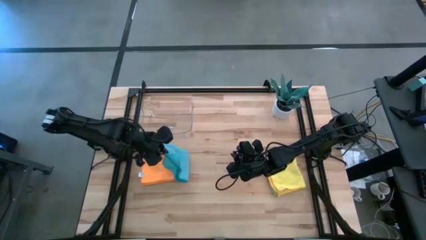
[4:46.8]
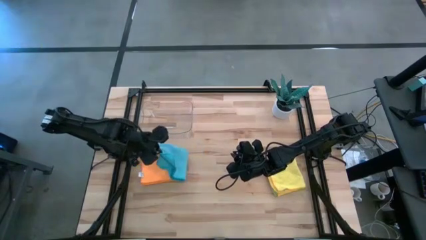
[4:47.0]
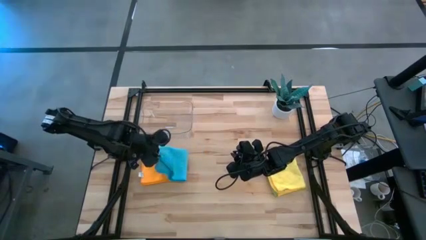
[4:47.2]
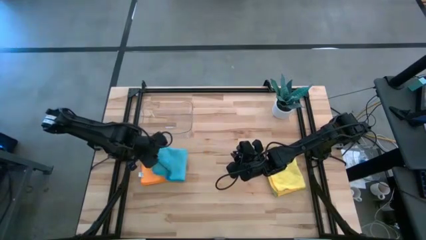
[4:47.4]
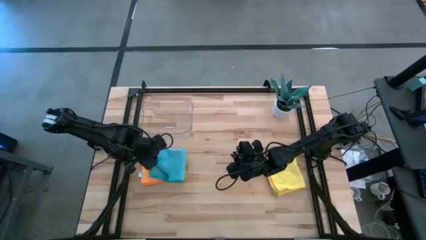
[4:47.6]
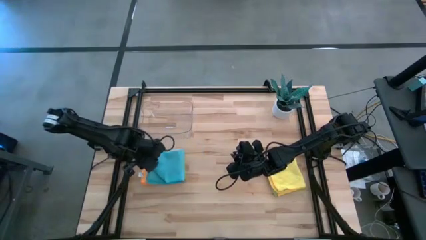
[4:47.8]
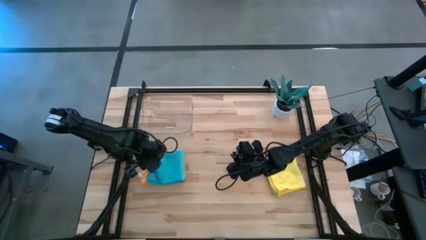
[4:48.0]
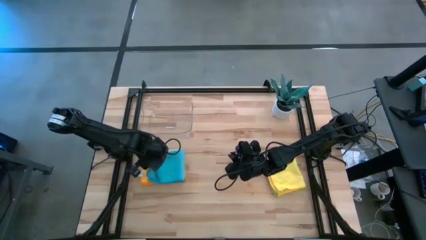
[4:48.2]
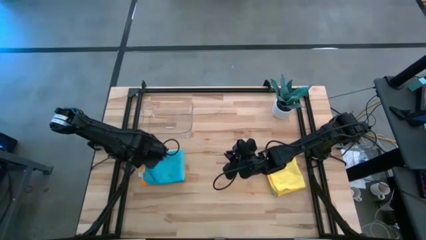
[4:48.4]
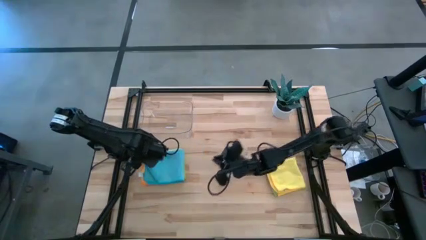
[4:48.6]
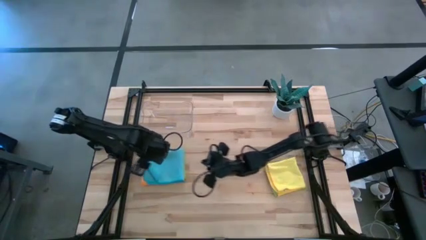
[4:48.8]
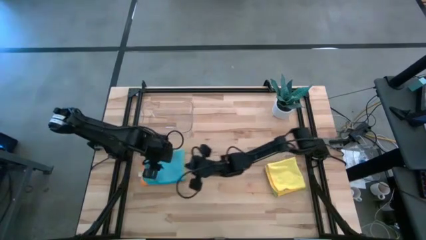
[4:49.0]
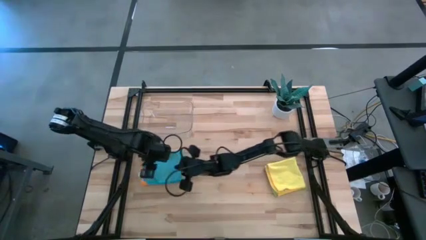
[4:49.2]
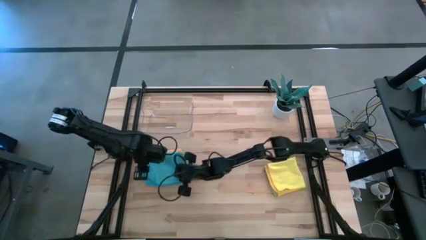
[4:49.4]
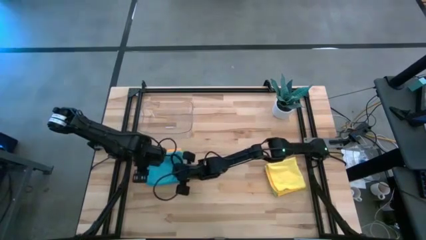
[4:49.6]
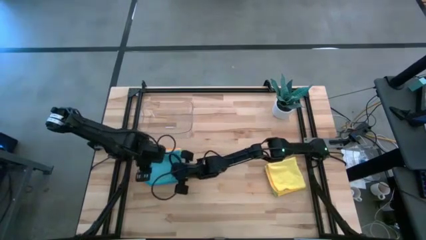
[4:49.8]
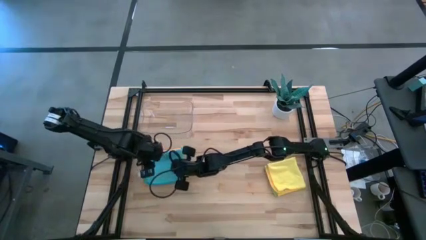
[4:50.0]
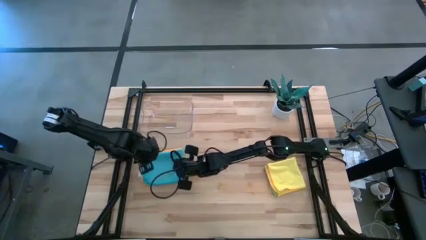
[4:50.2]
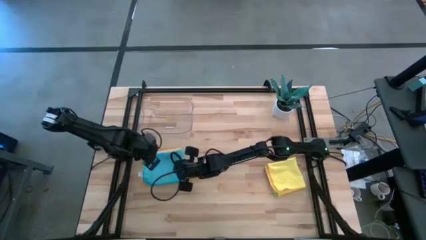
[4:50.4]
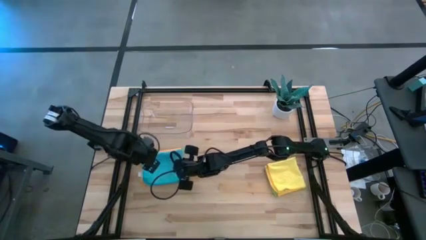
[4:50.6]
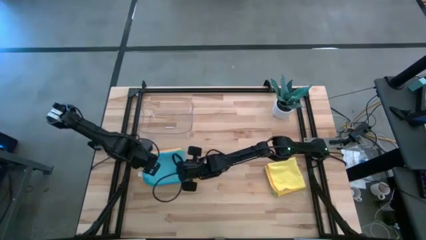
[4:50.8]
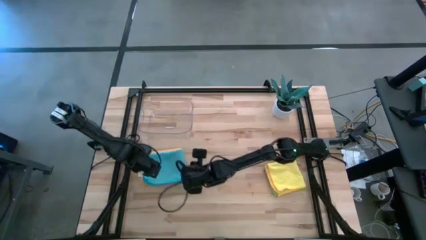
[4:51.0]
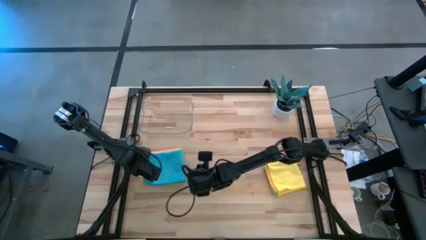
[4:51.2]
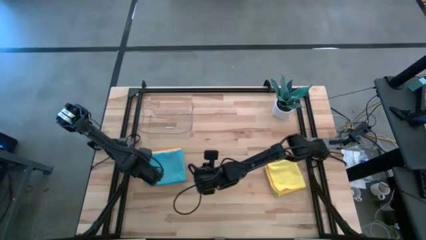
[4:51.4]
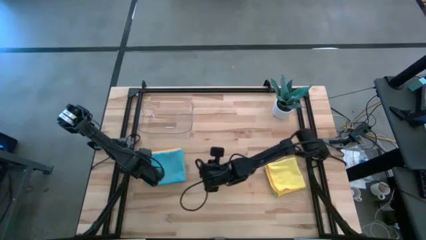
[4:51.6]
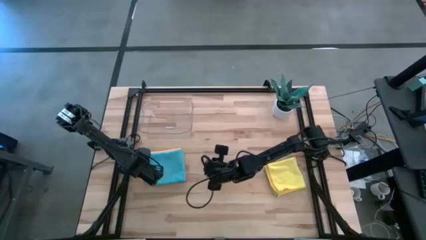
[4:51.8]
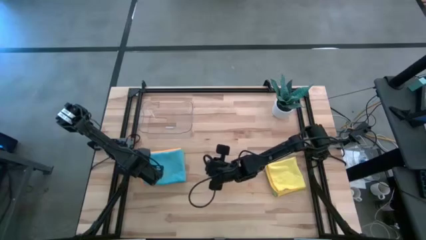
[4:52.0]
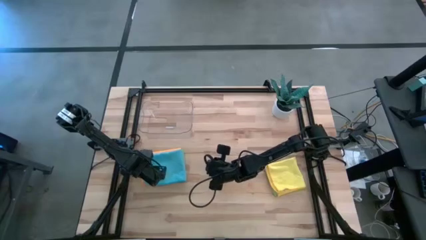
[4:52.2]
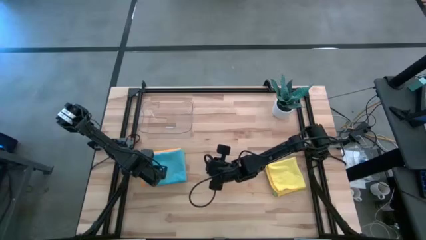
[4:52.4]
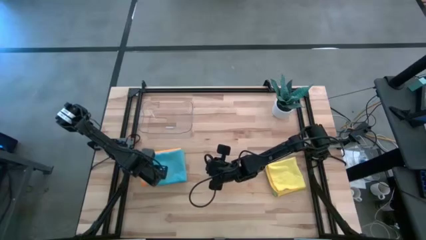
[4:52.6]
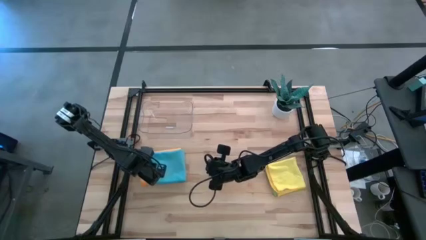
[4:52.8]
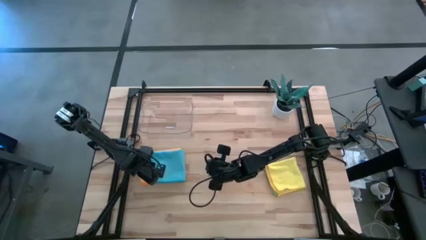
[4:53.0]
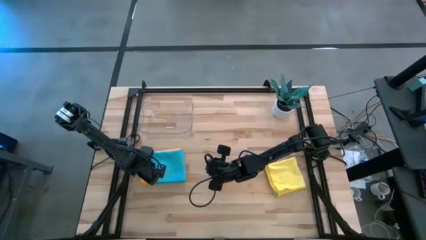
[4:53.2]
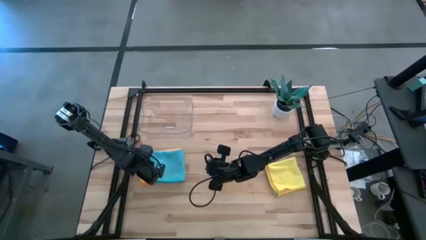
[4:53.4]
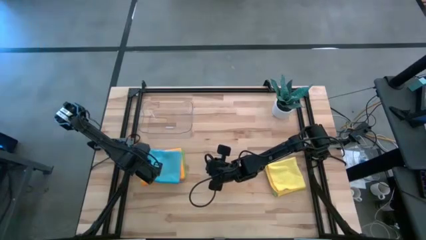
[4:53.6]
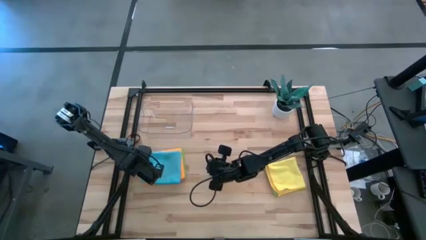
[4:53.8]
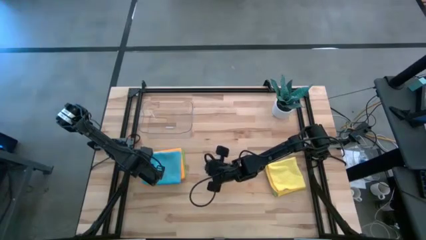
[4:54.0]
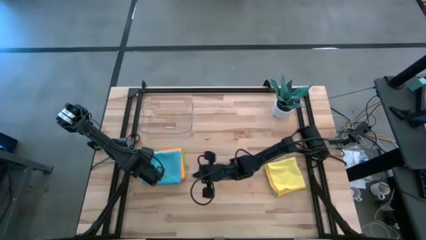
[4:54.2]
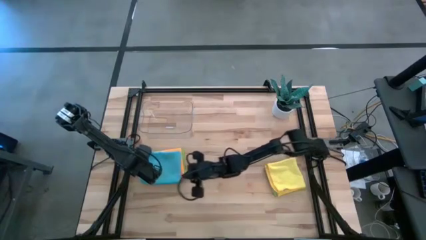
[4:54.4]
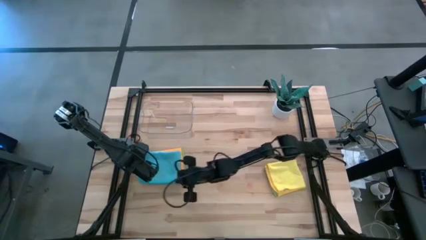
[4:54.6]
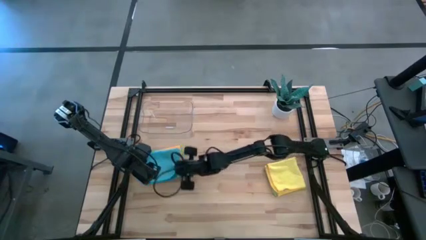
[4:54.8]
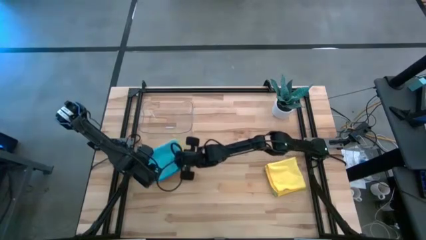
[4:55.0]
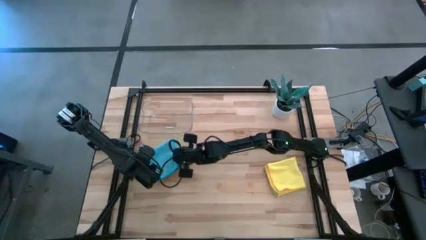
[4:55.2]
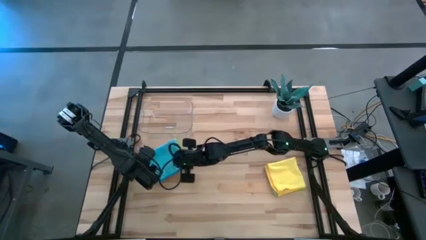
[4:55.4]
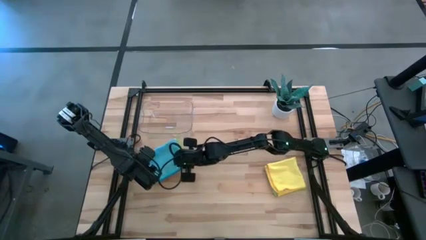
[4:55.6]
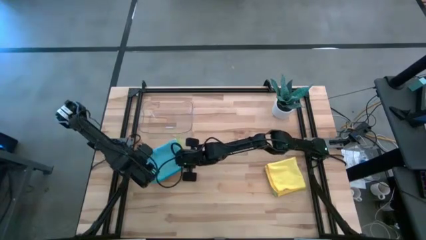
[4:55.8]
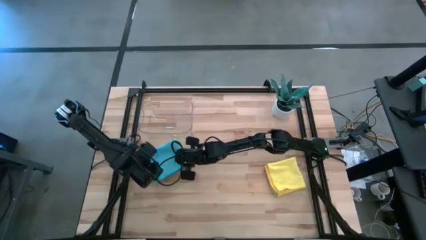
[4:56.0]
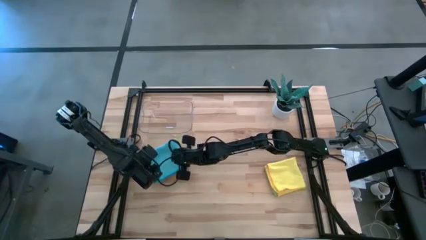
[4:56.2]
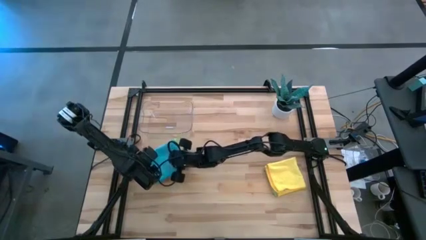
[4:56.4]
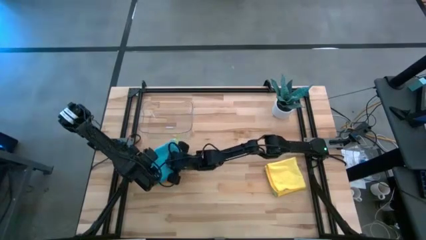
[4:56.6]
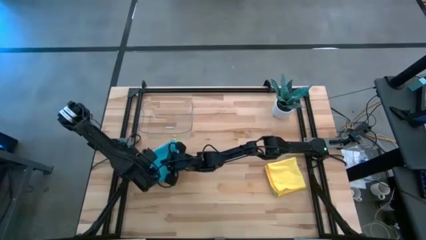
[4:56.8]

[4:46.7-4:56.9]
Task: Fold microfiber towels
Stack the blue microfiber cloth on top of the orange microfiber cloth

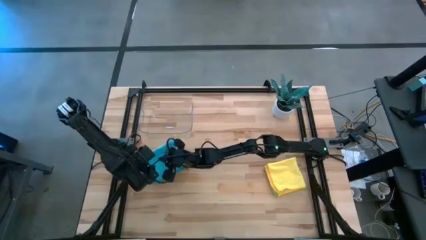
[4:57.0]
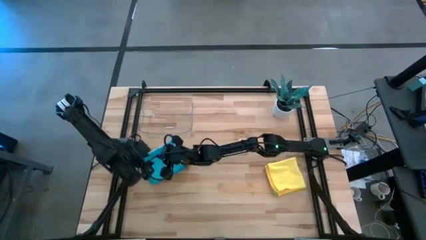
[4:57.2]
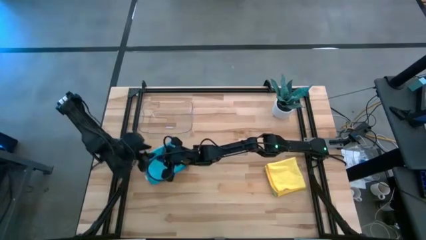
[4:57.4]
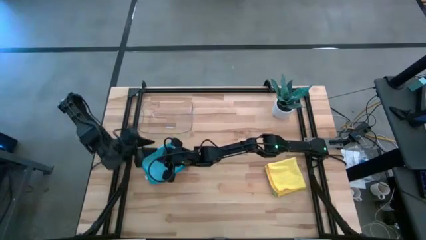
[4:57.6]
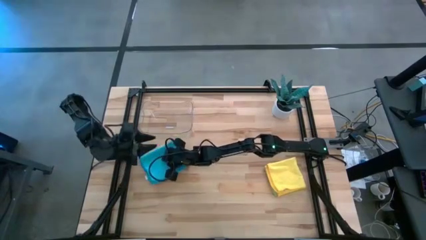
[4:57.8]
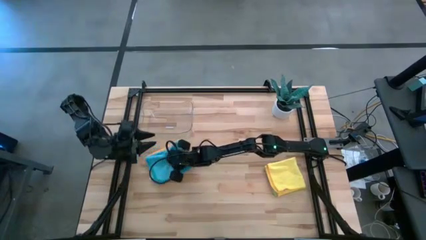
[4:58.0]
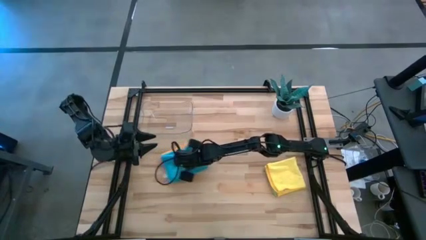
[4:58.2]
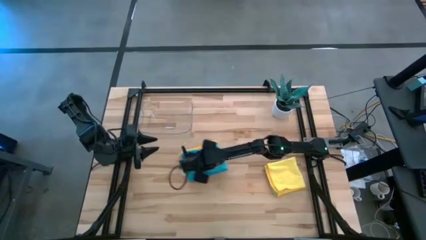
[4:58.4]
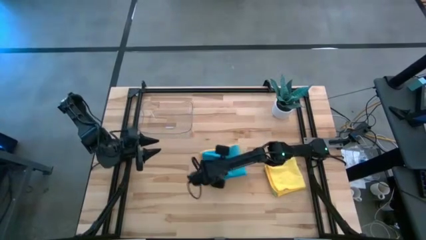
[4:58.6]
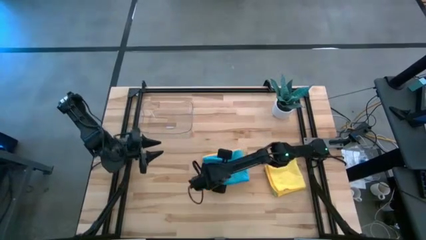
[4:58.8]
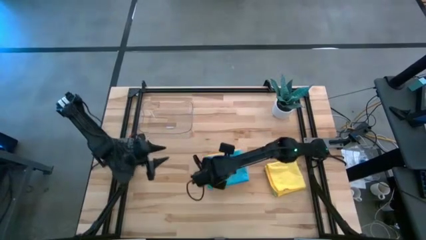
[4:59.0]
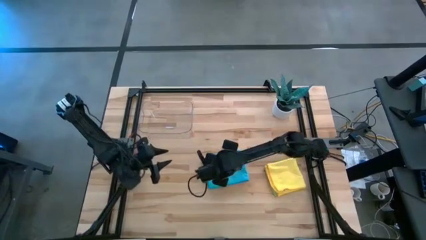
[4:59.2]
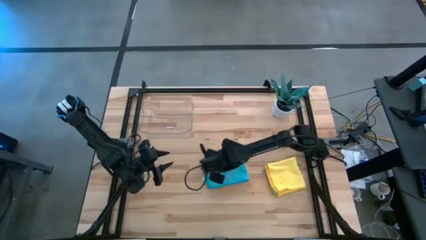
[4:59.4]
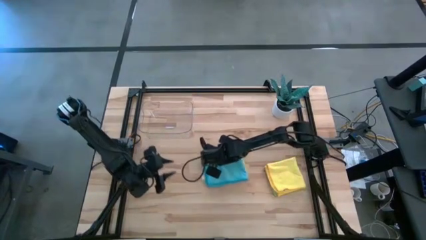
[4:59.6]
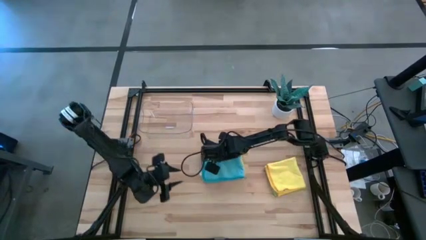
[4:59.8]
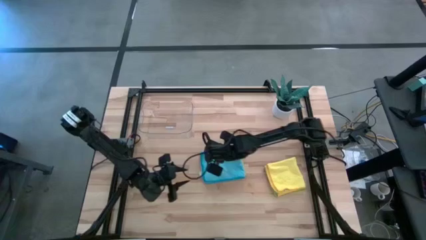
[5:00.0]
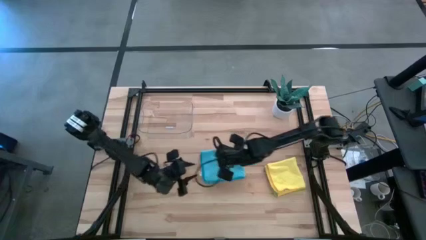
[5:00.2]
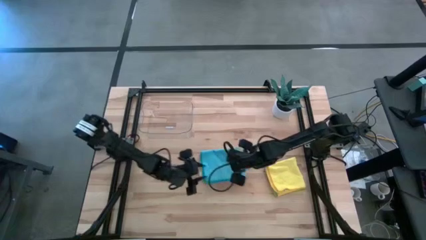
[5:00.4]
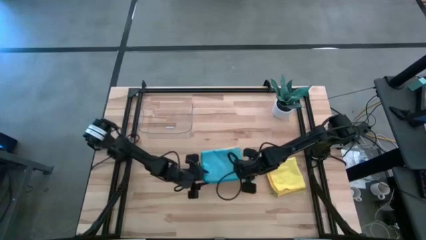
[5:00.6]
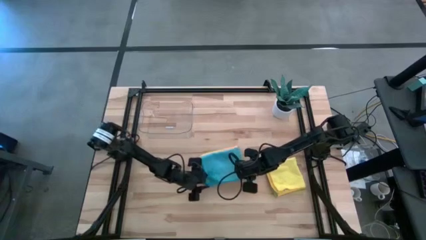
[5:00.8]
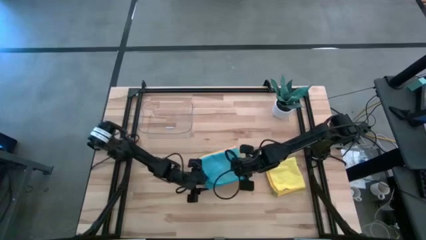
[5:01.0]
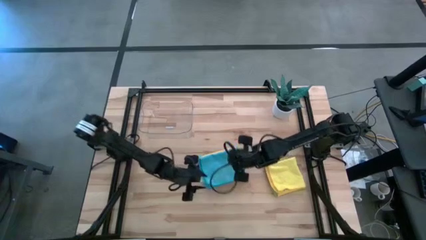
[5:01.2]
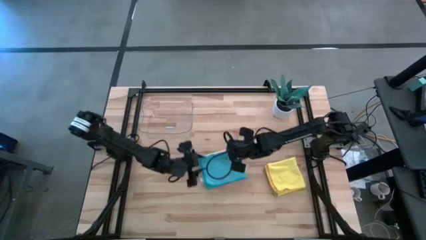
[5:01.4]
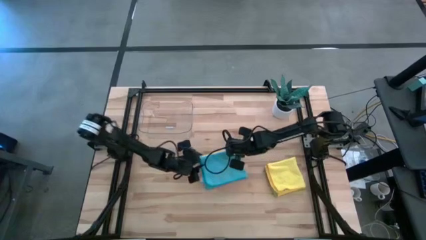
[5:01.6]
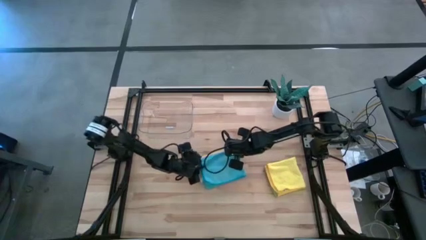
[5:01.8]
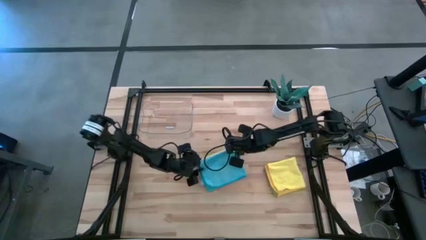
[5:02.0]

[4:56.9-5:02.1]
Move the left stacked microfiber cloths to the center of the table

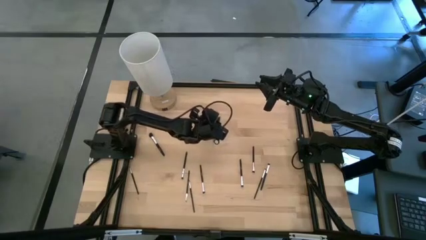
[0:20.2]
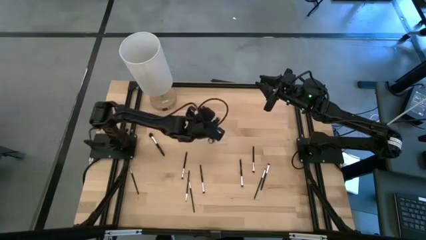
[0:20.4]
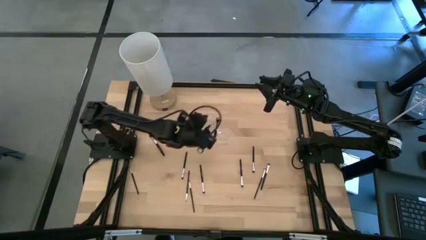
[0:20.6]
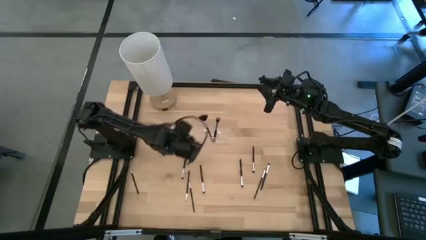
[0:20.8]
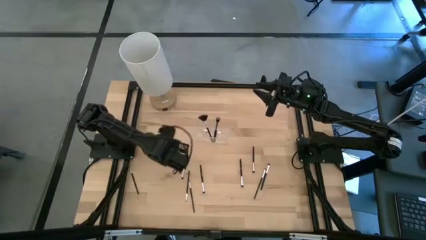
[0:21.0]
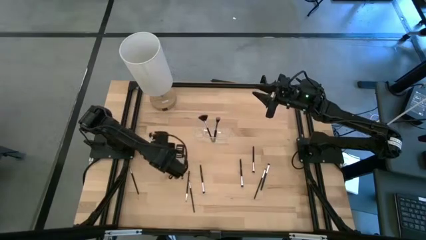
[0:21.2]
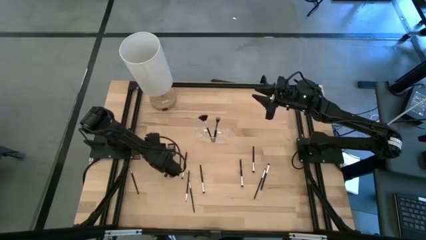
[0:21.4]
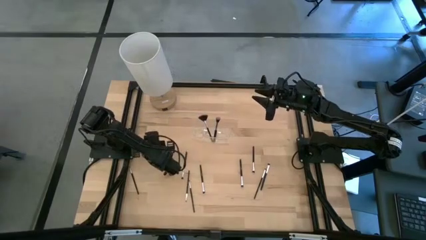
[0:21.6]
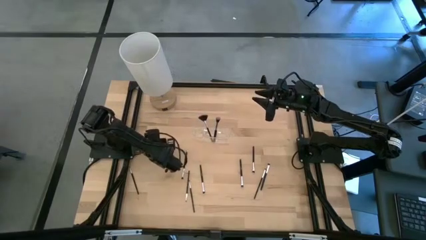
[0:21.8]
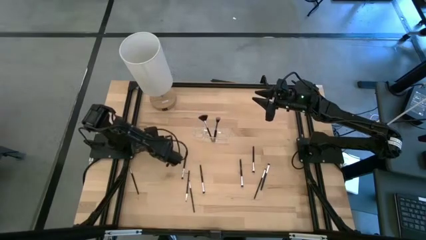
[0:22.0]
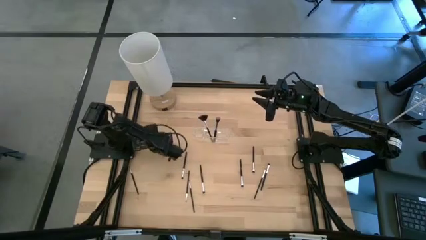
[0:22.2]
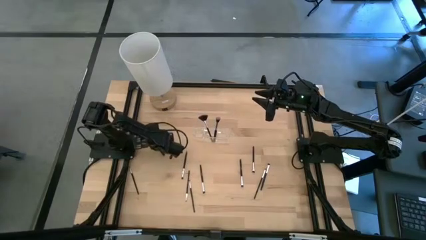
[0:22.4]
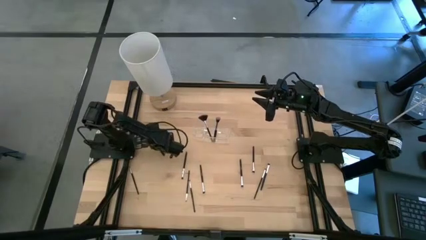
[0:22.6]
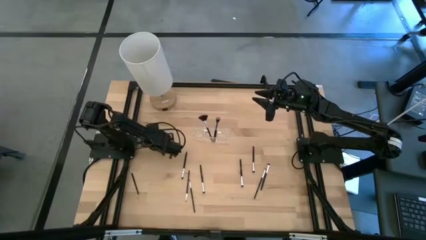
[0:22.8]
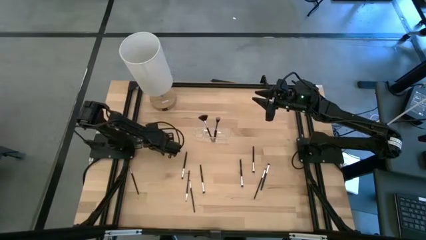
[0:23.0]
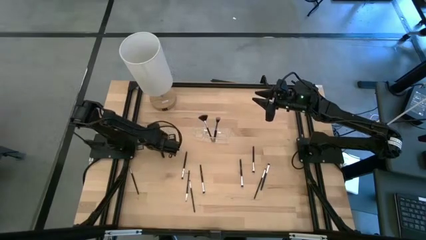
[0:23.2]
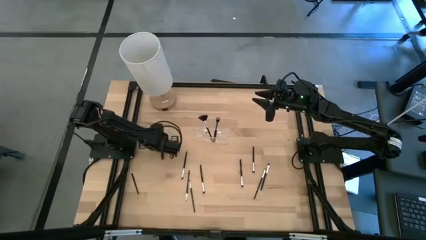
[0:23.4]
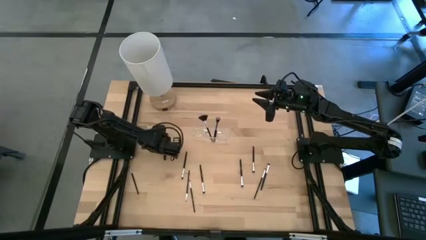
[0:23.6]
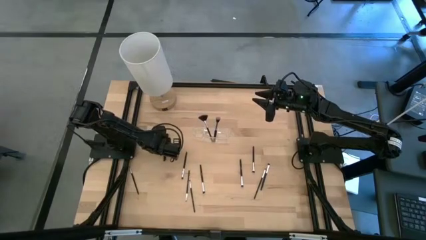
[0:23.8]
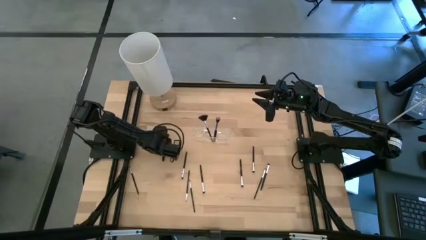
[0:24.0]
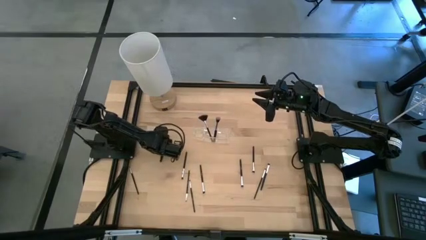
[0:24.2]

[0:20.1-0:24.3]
Task: Put items in baskets/containers
Put the black powder brush into the transparent organizer
